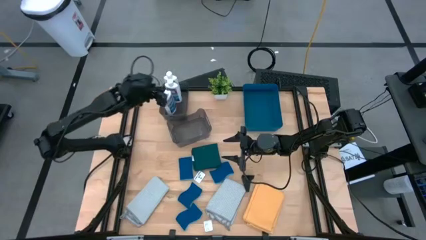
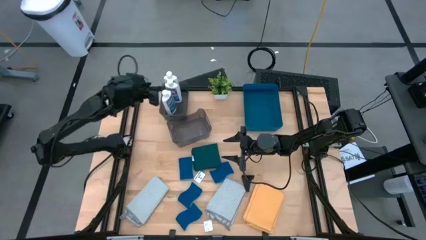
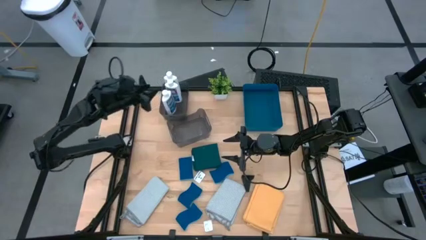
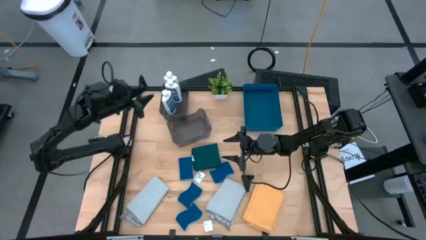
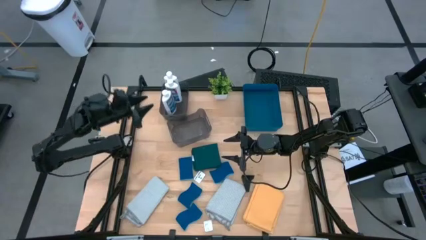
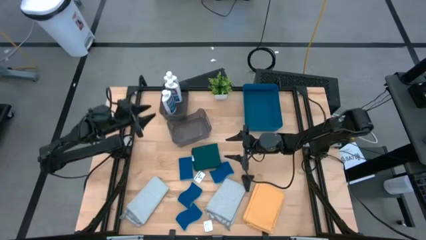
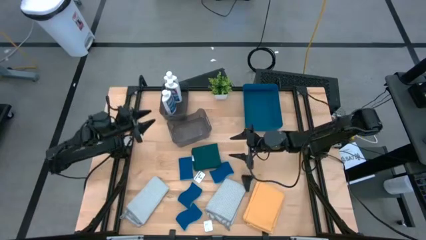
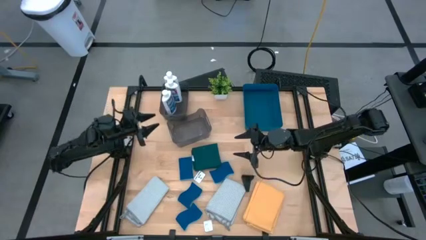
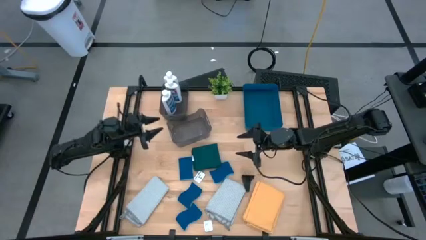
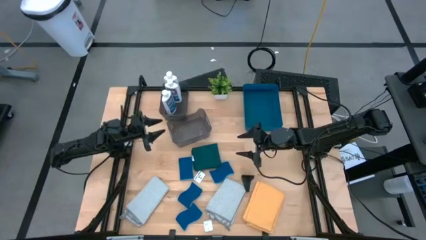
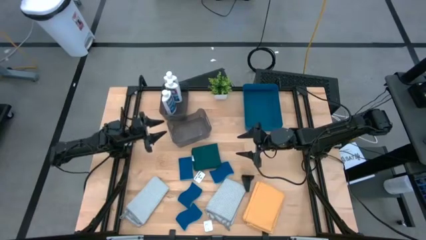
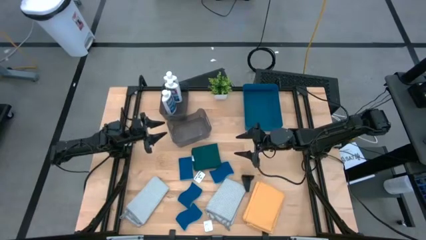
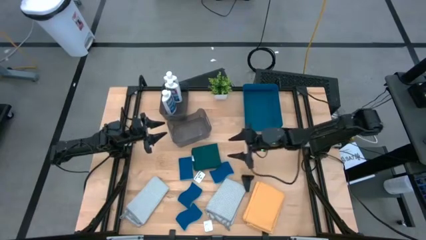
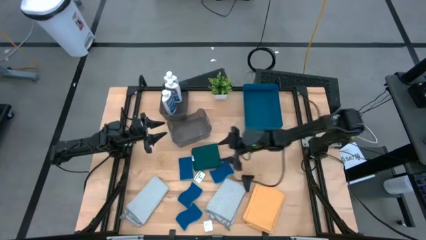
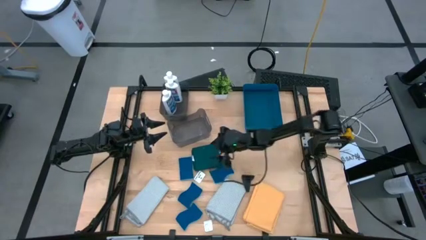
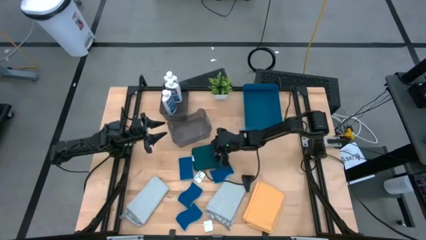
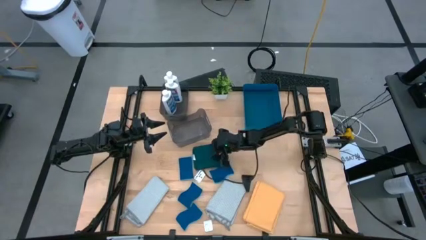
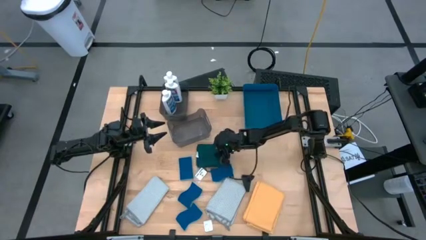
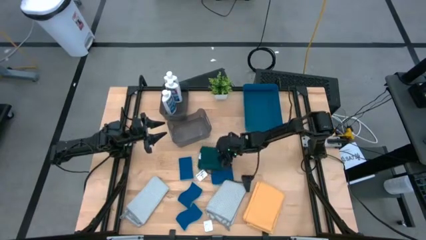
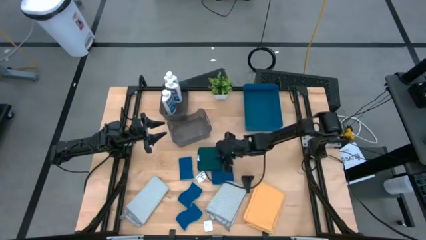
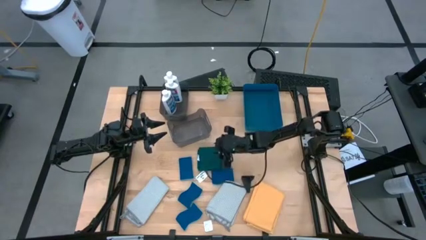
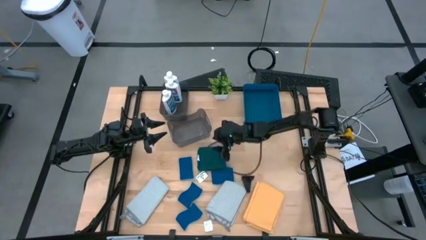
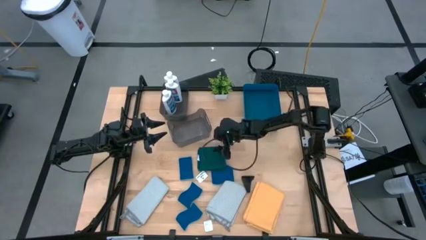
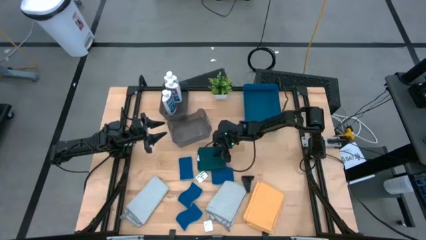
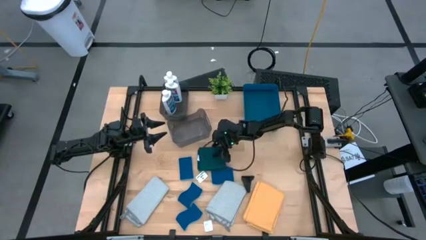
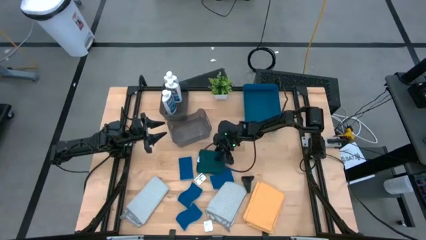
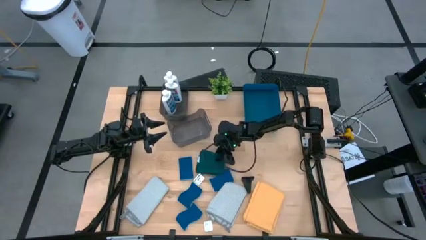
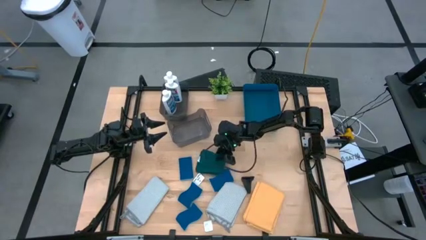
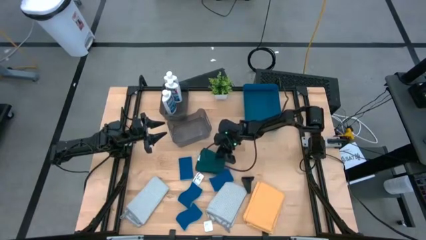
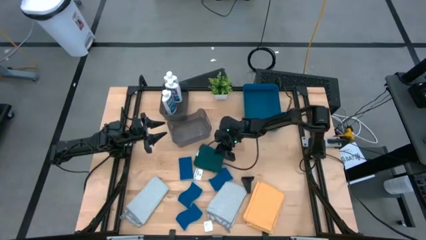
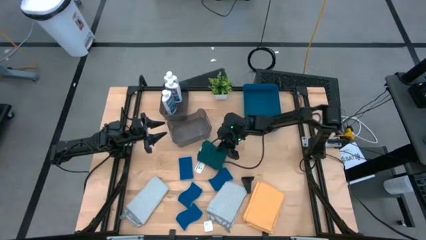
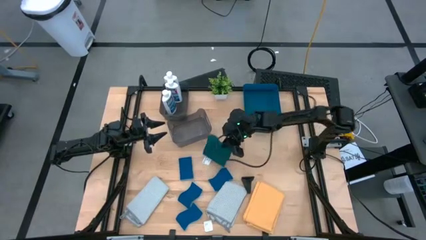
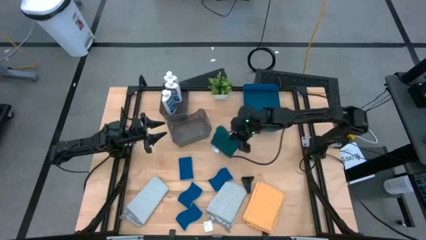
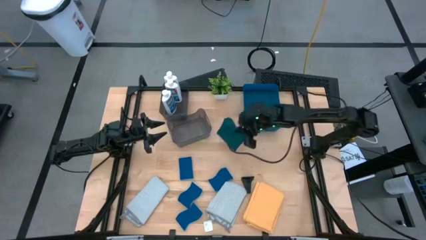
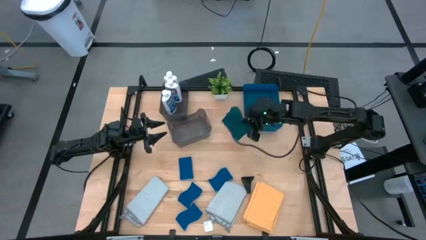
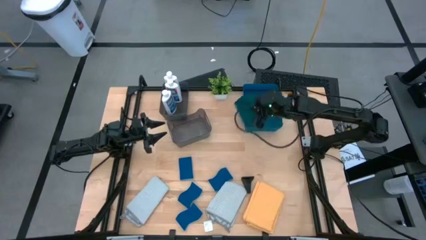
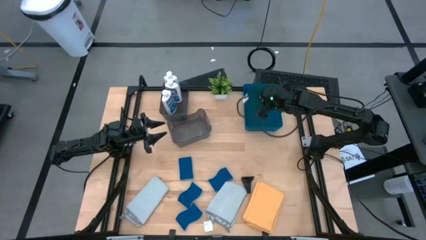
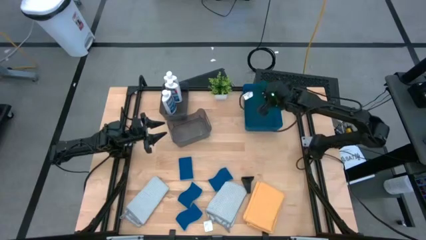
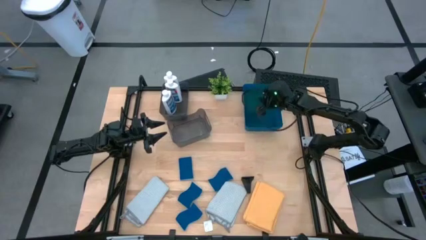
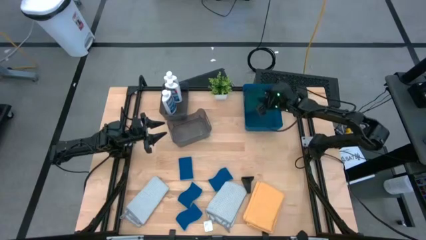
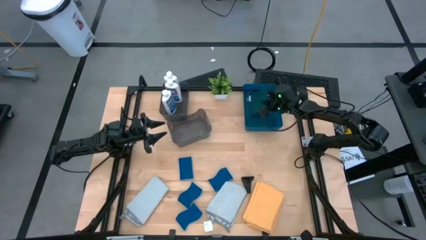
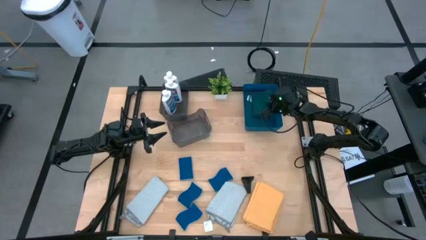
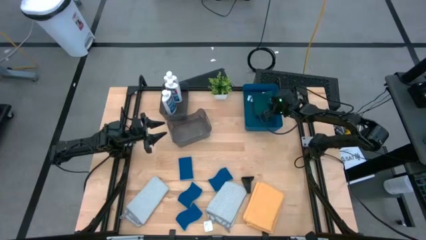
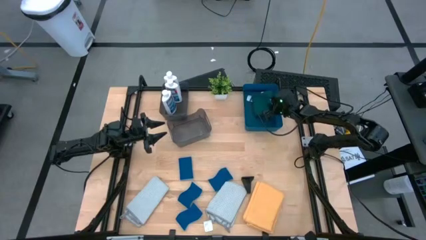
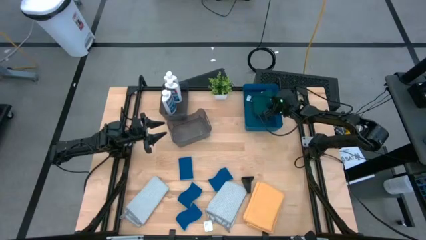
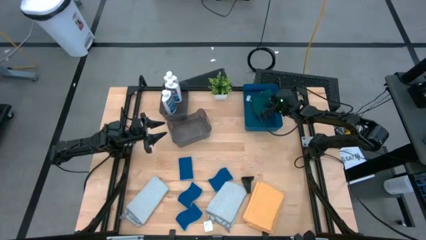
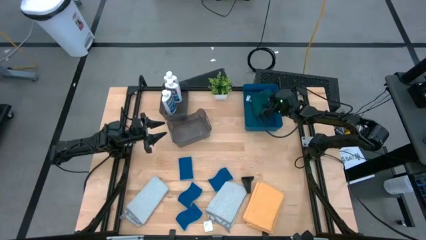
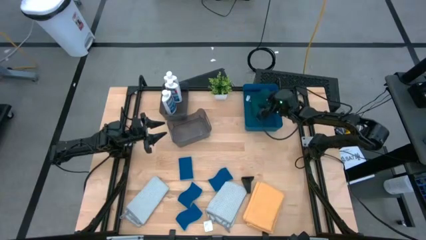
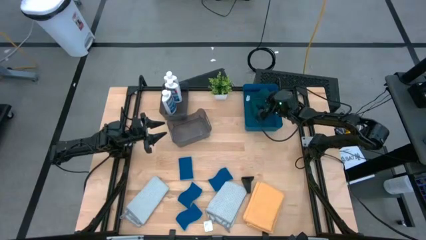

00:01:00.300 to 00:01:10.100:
Task: Pick & Place Kitchen Items
Put the blue towel into the blue bin

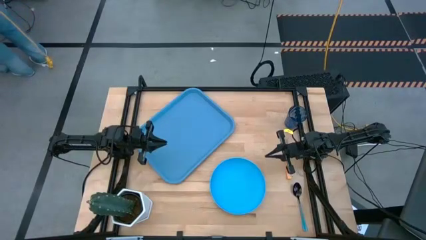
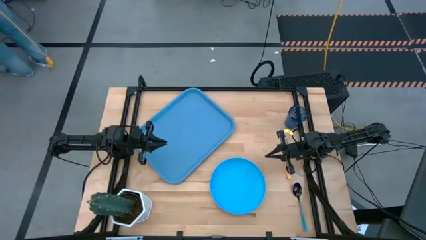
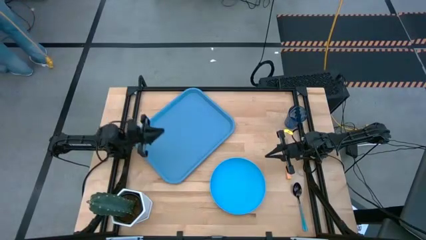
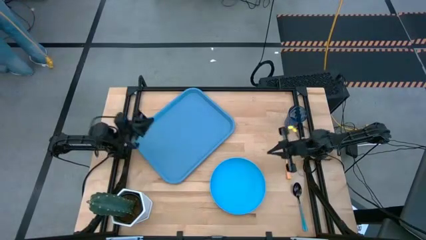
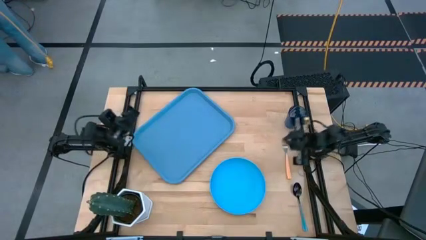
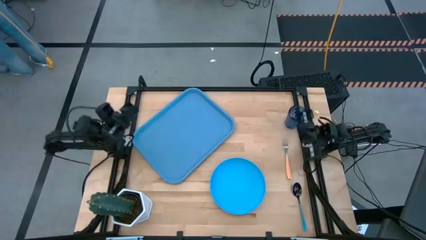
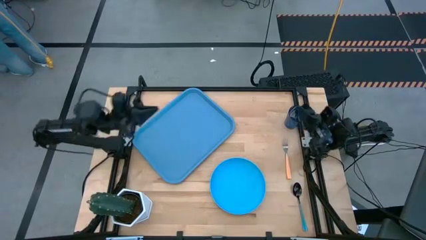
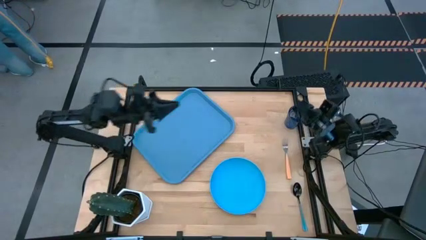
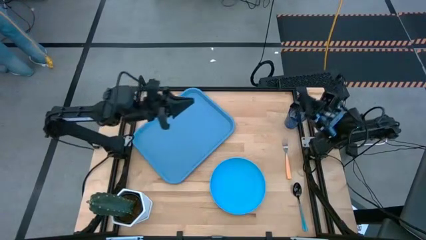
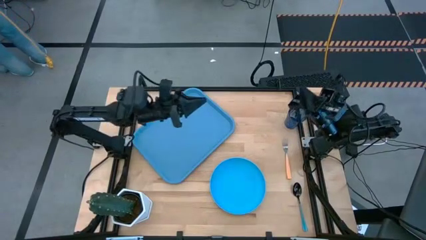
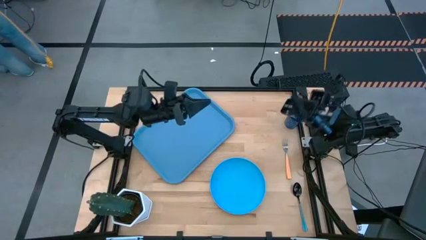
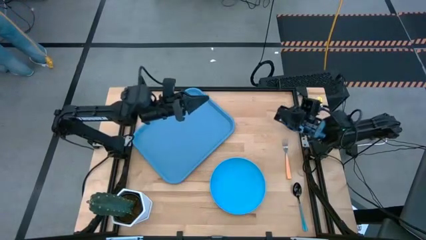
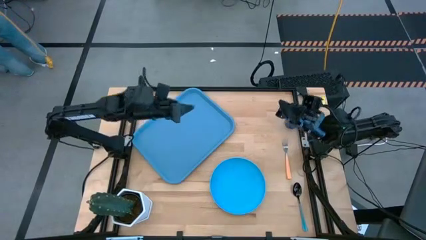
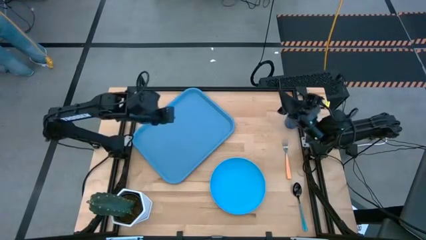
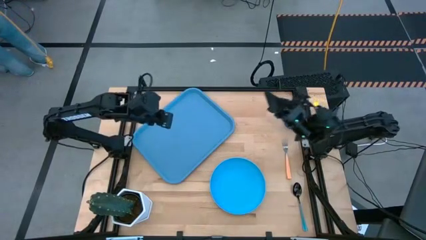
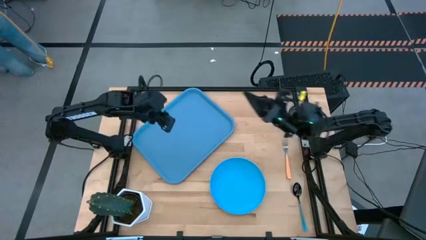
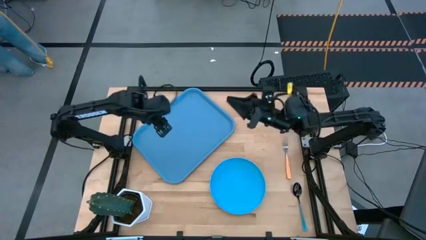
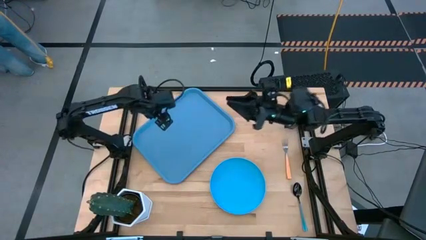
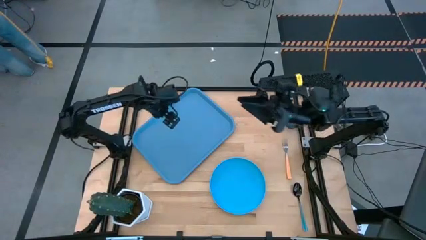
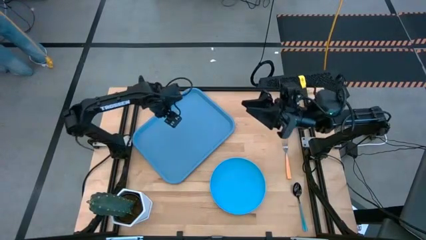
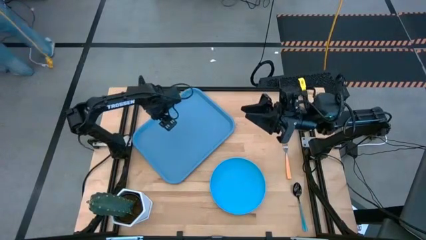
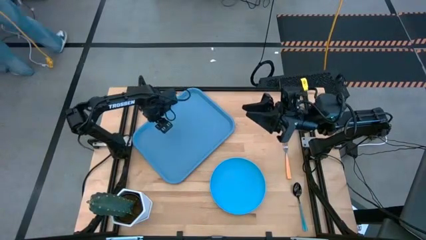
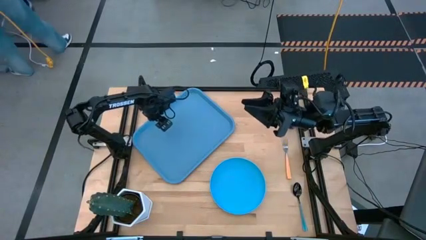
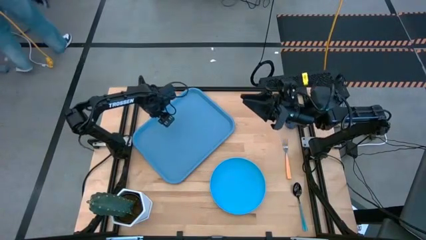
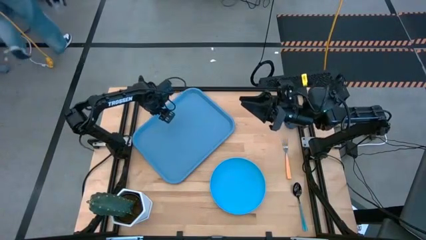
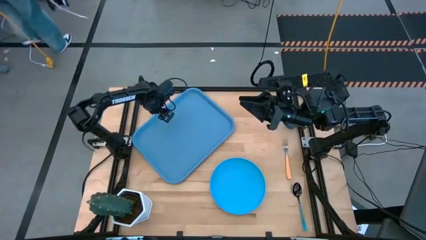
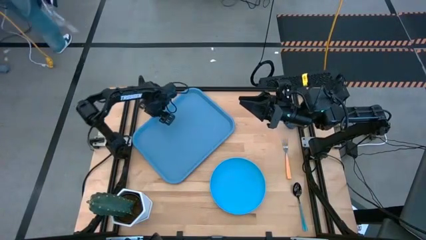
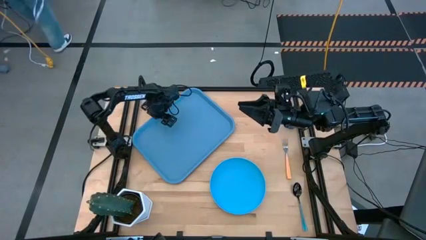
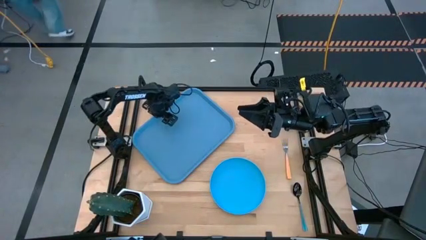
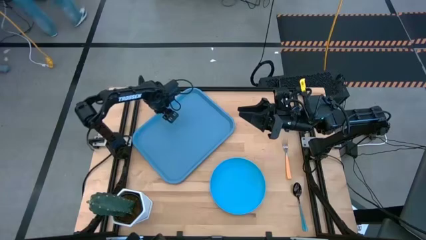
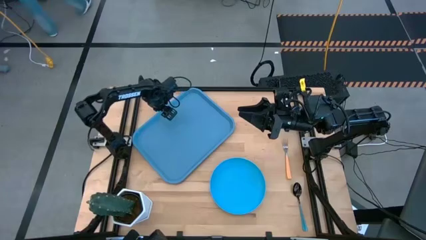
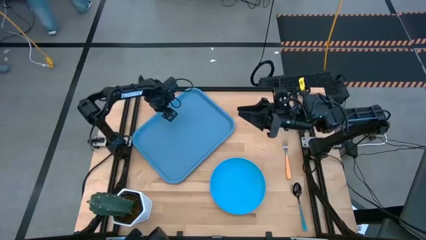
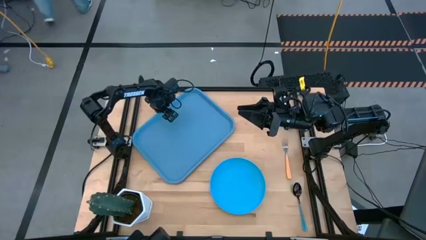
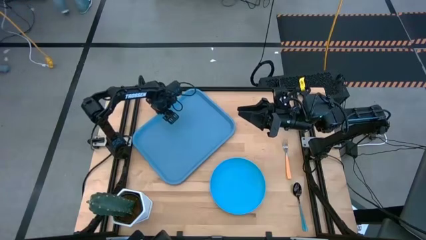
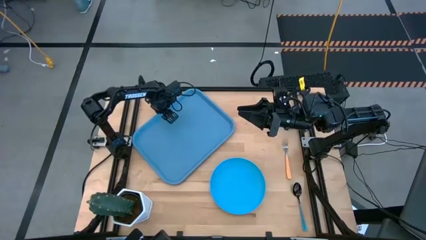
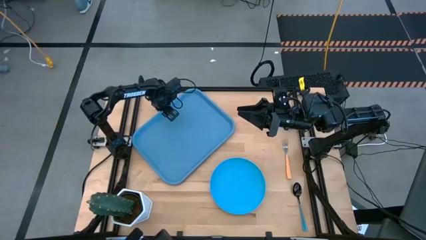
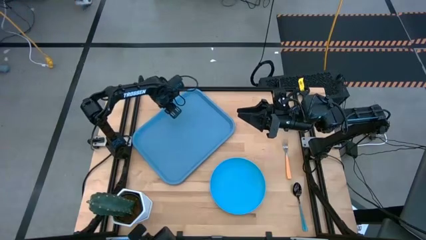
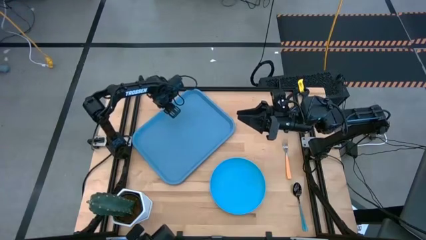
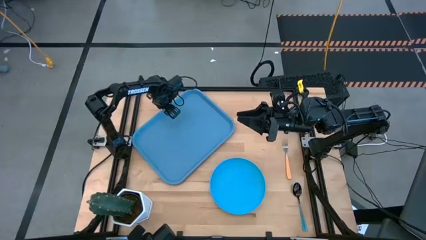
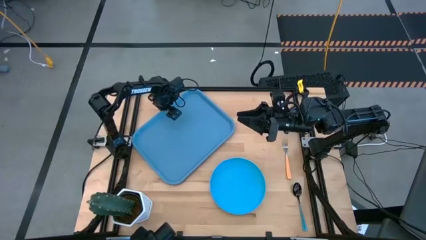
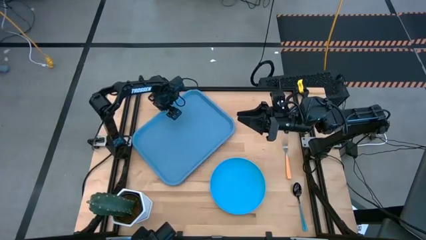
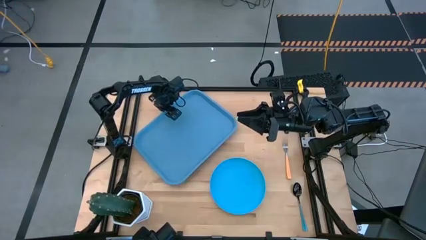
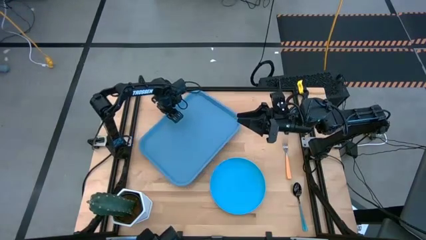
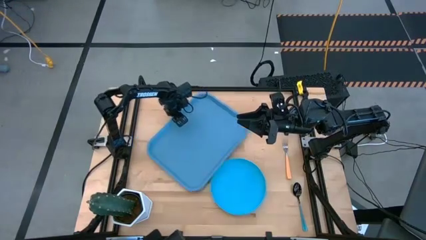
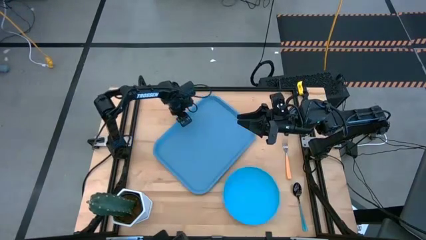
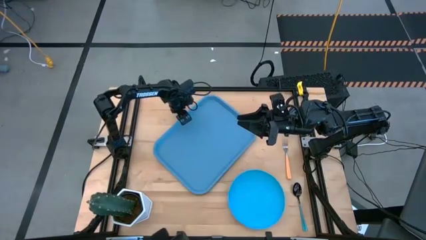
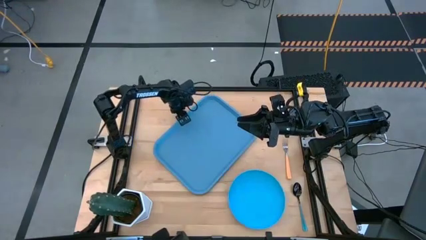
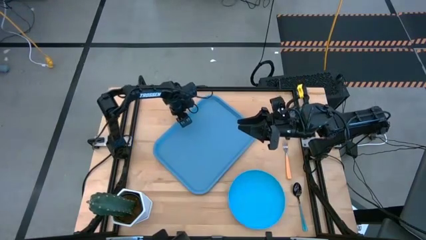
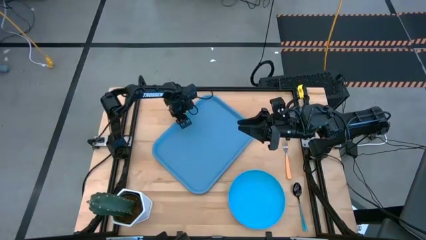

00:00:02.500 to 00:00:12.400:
Task: Pick and place plate/cup/fork/spoon on tray
Prepare the blue serving tray on the table
